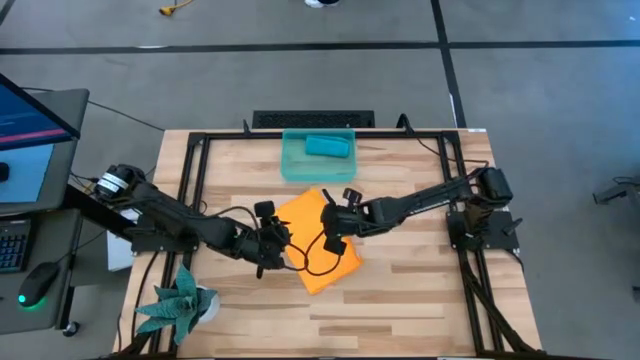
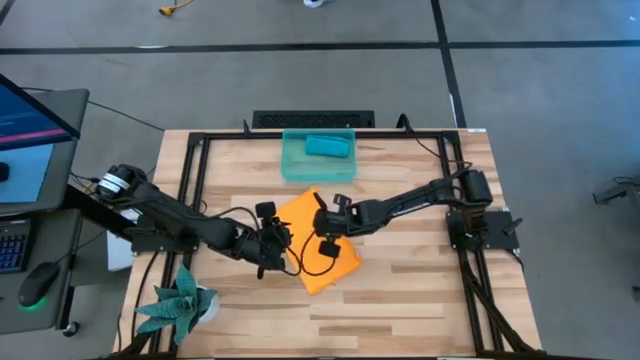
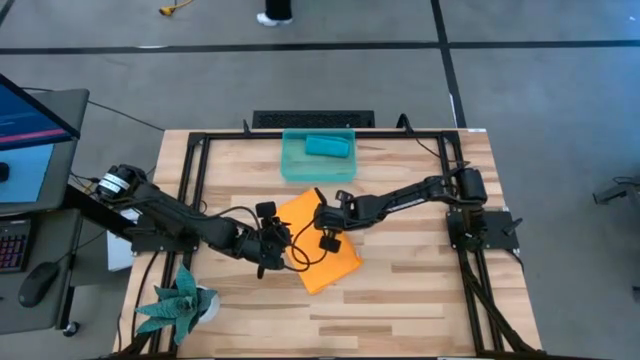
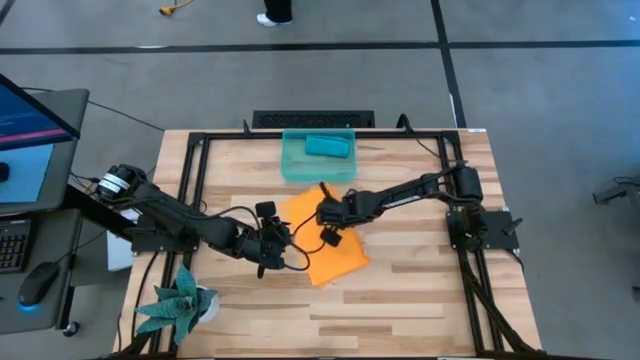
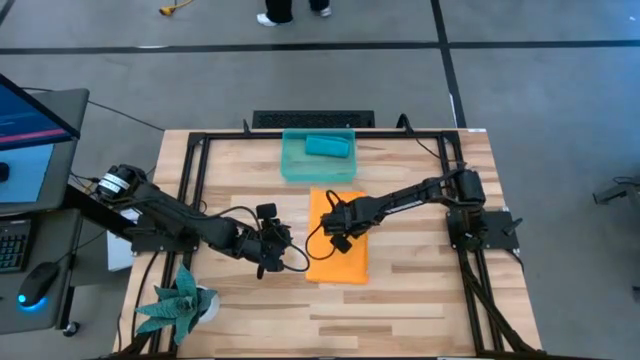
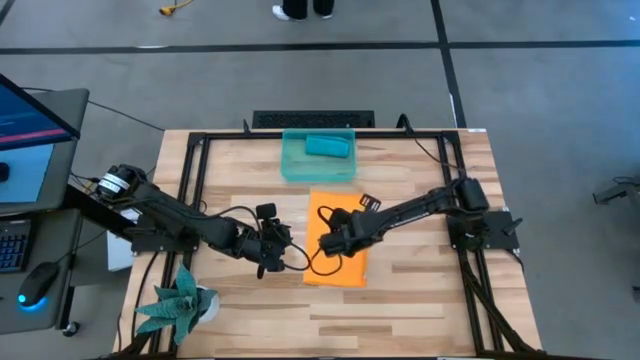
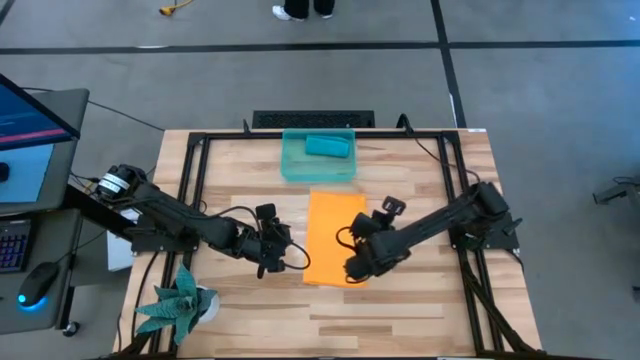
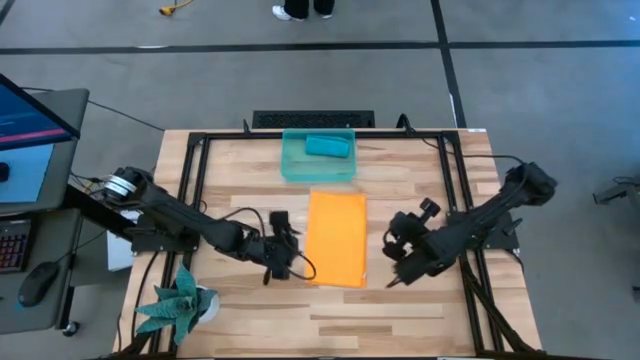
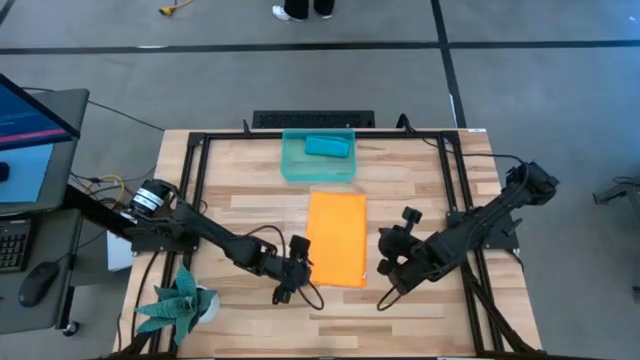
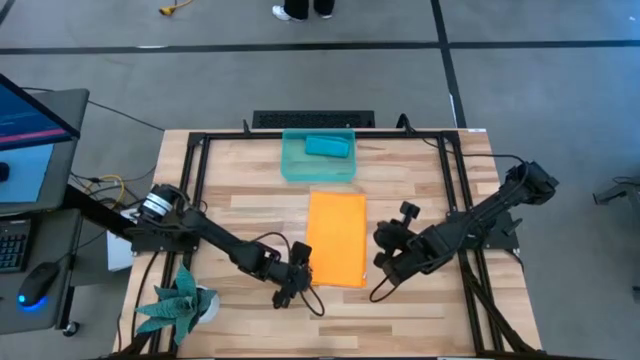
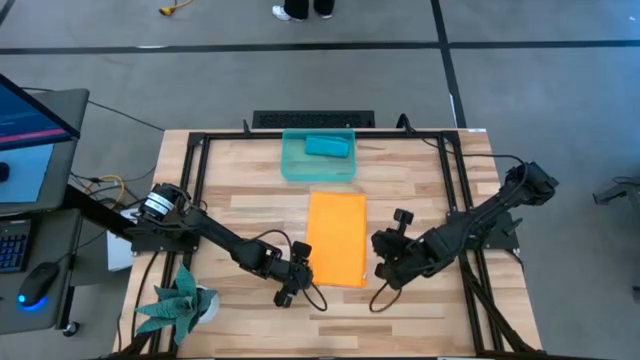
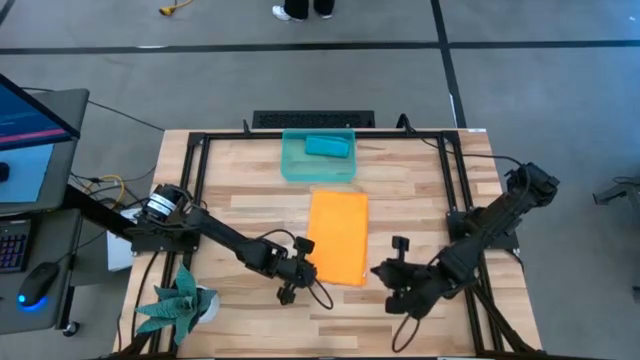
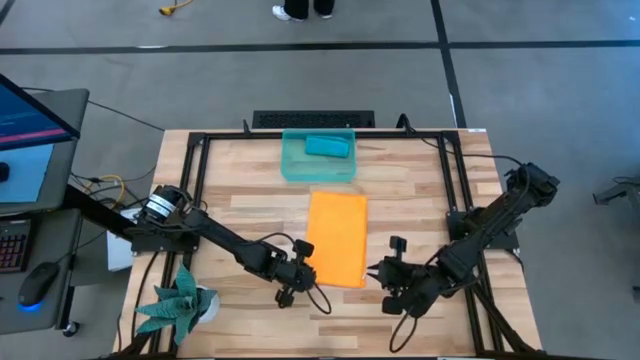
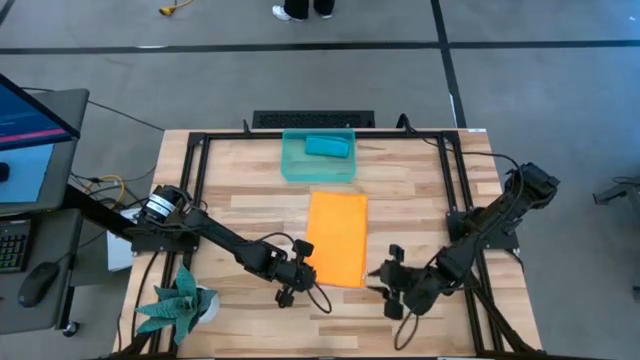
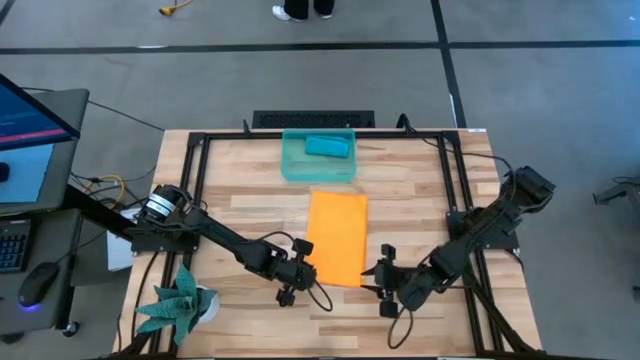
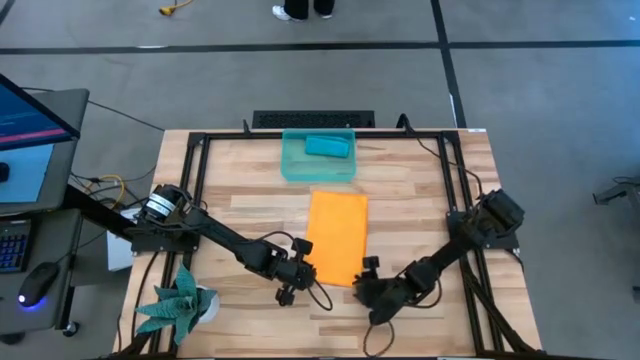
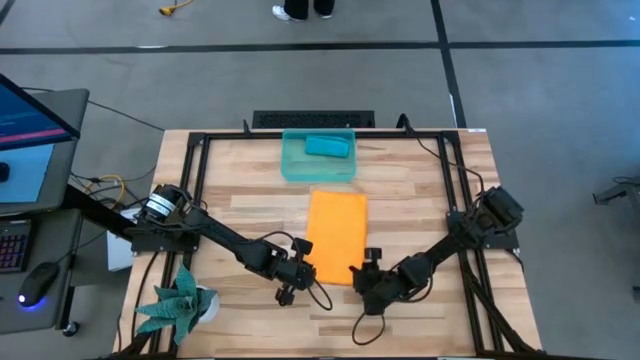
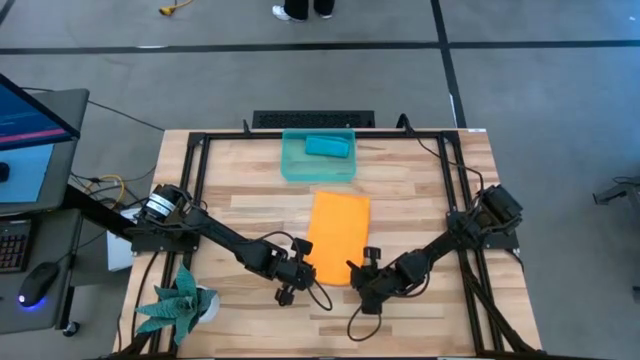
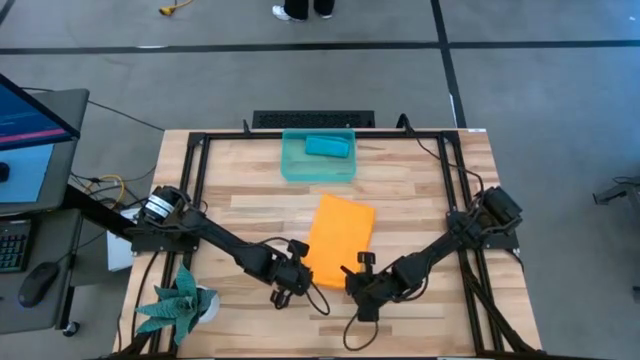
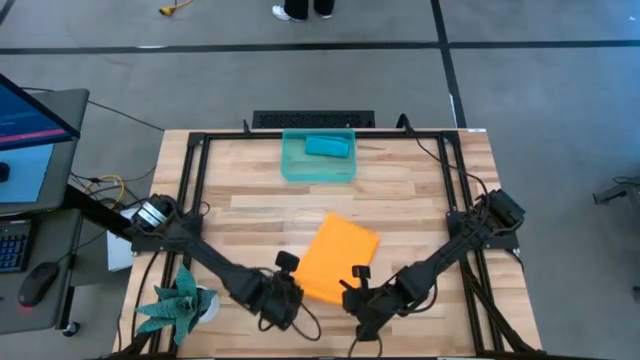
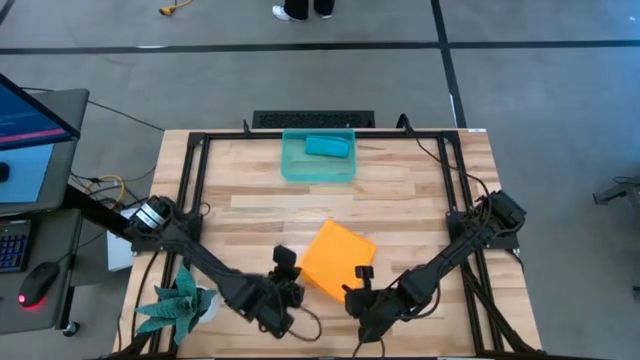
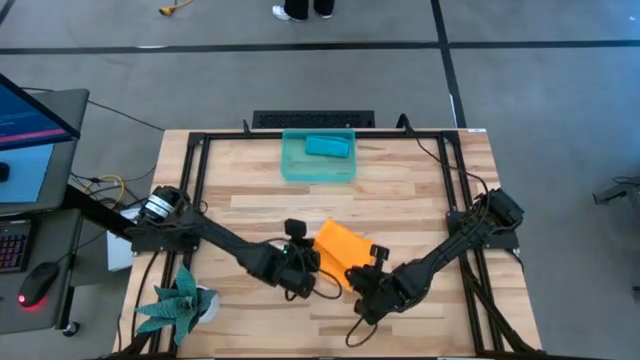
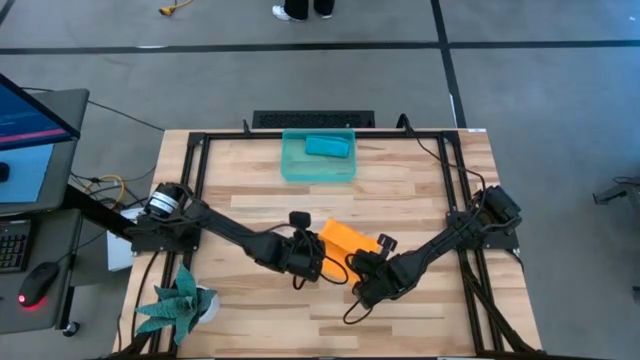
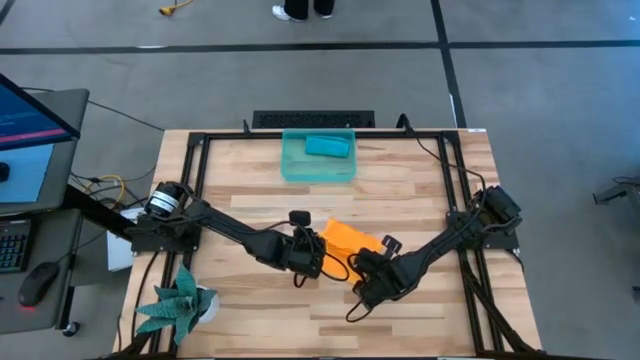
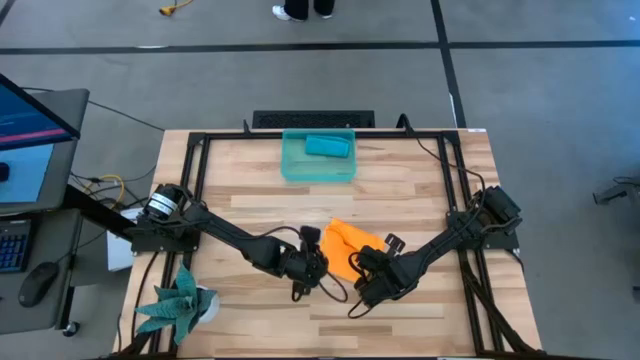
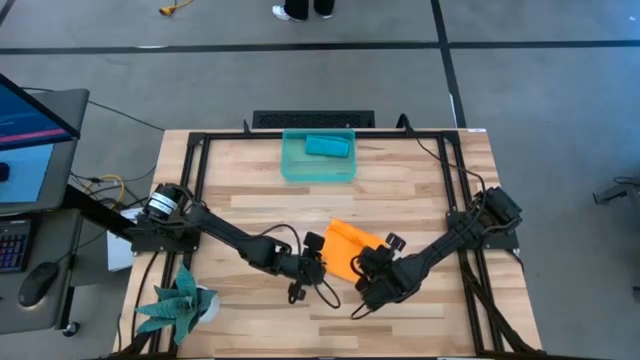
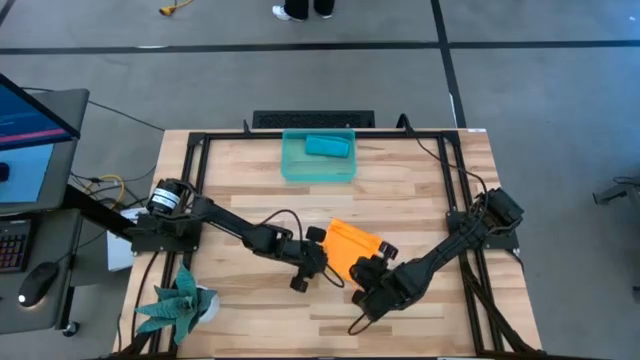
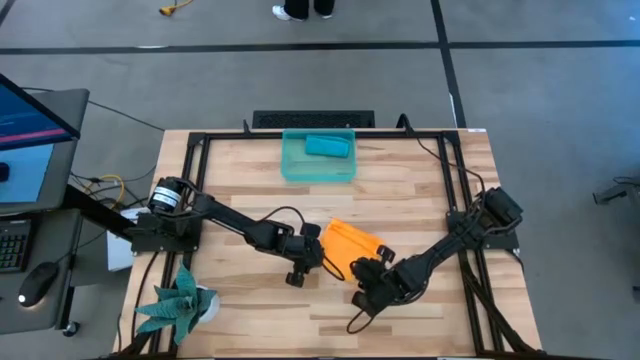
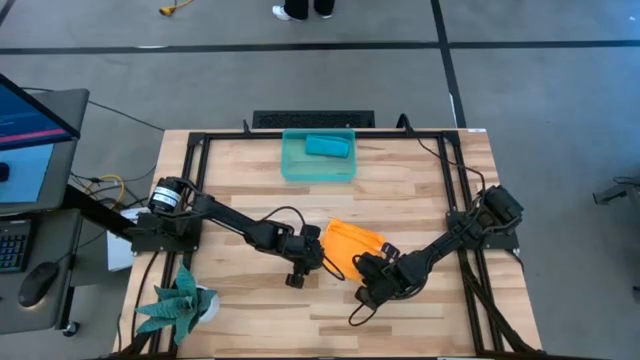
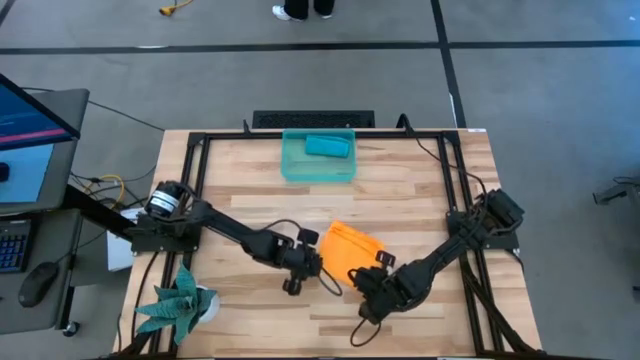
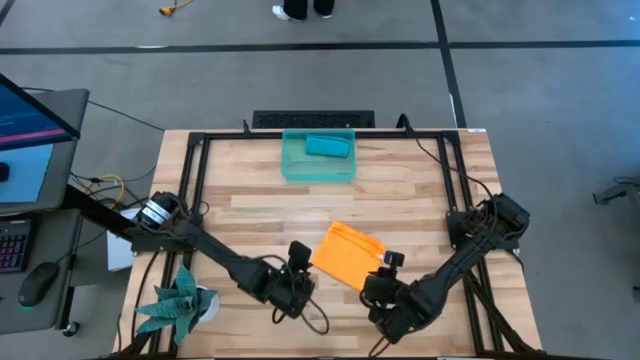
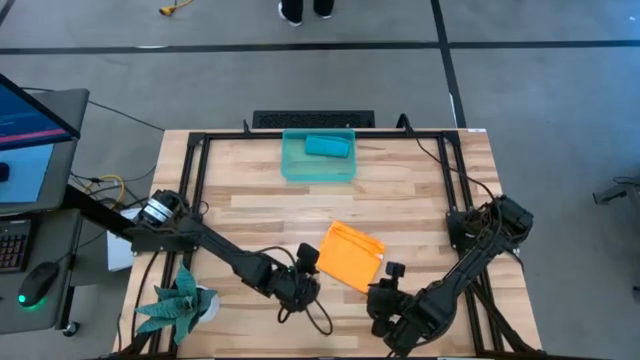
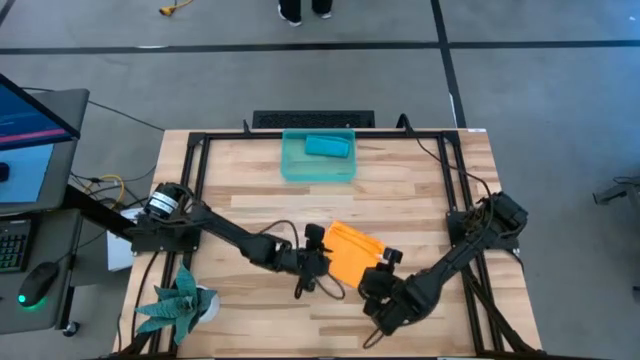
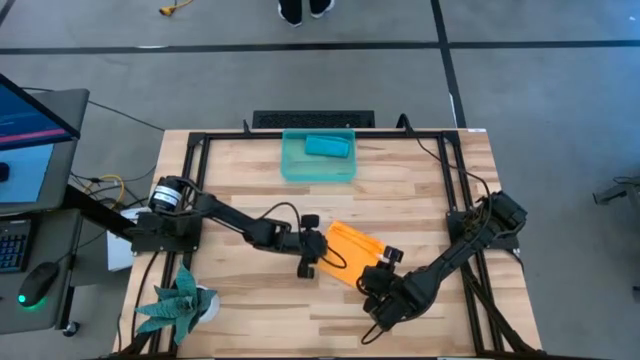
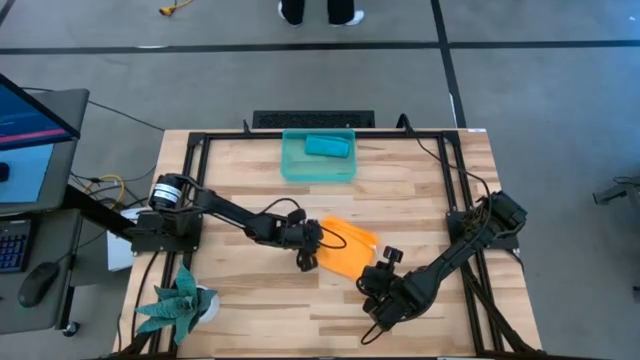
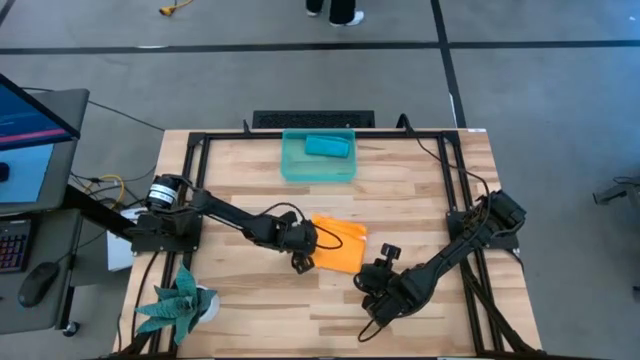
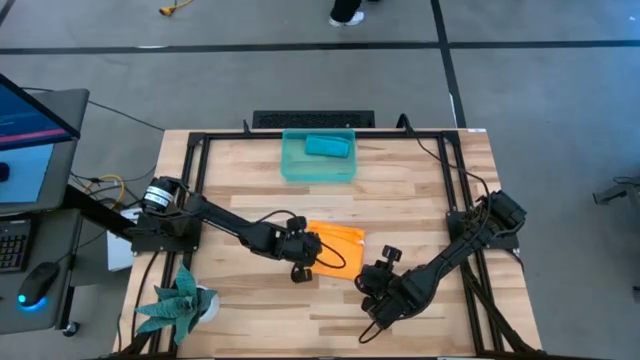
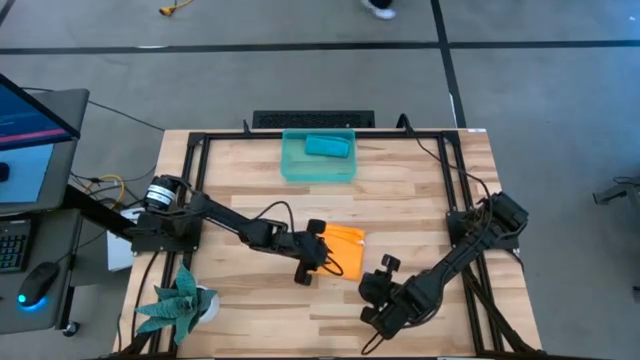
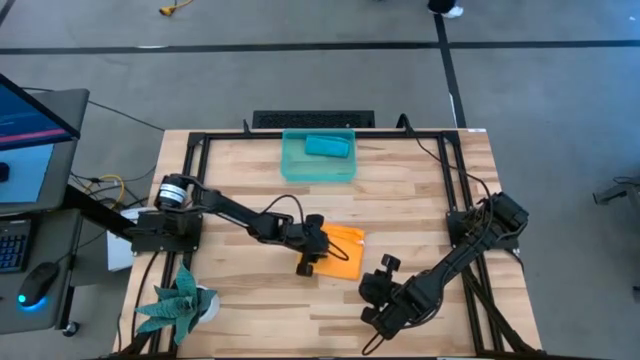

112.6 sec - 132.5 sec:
Task: Roll microfiber towels into tight, uniform cylinder then place into a basket
Roll the yellow microfiber cloth
